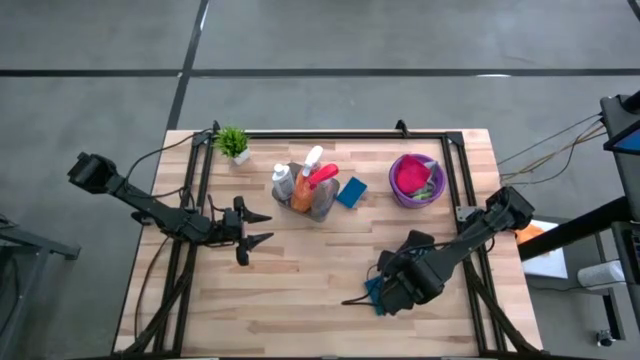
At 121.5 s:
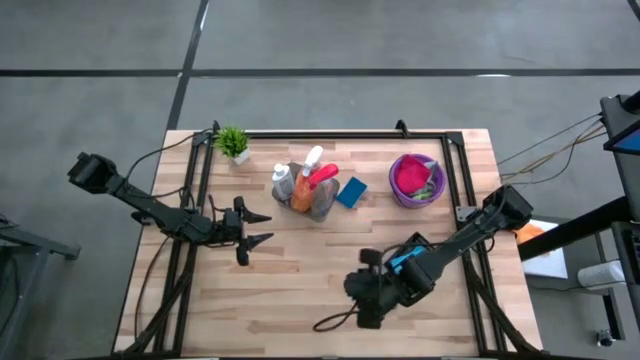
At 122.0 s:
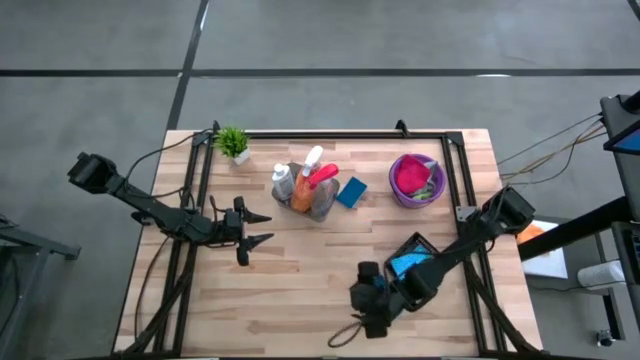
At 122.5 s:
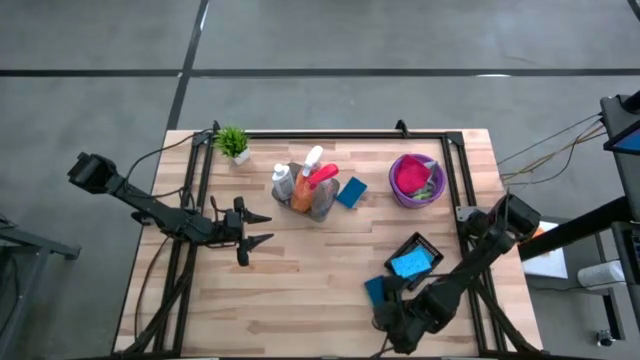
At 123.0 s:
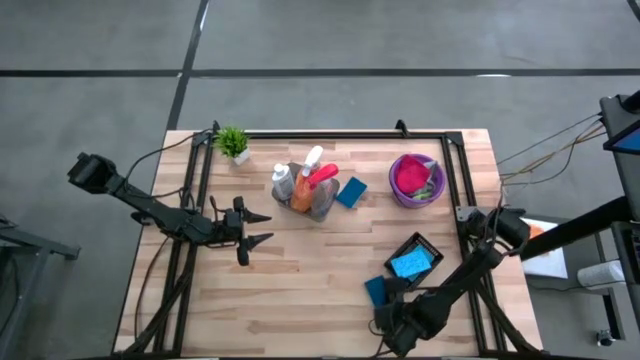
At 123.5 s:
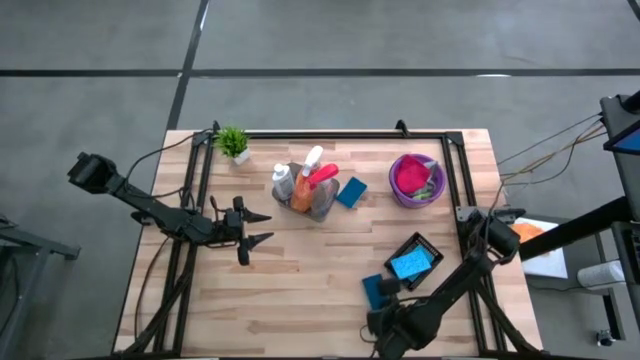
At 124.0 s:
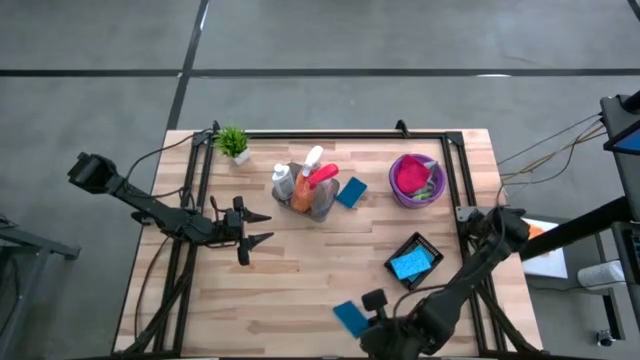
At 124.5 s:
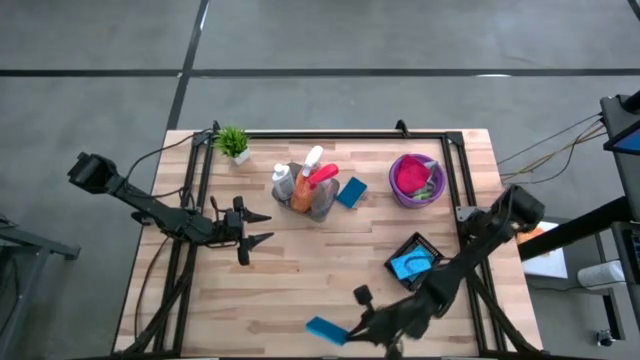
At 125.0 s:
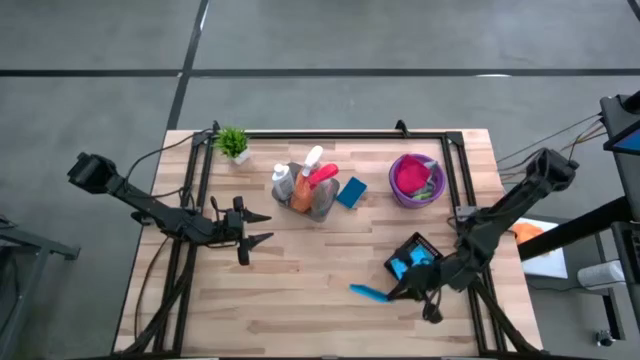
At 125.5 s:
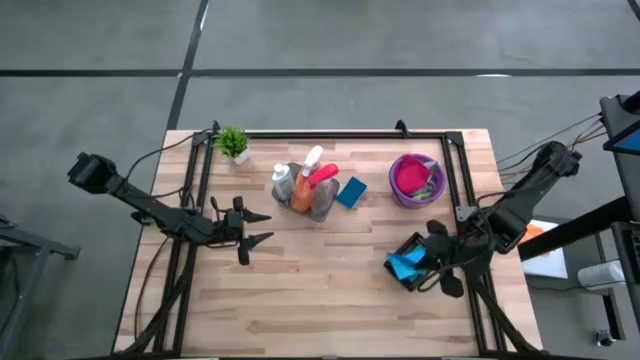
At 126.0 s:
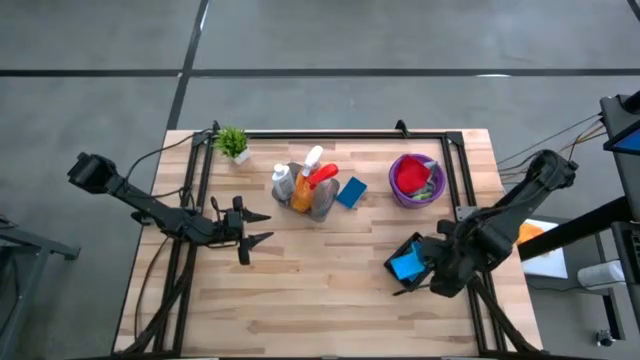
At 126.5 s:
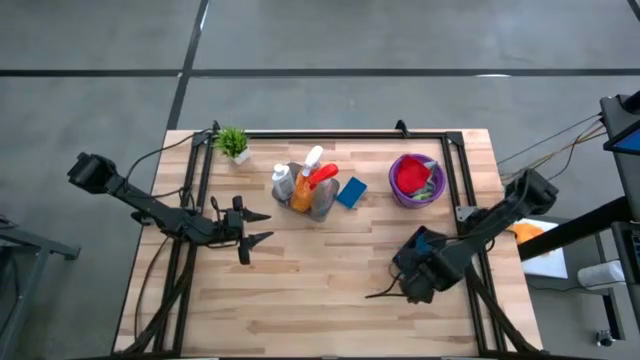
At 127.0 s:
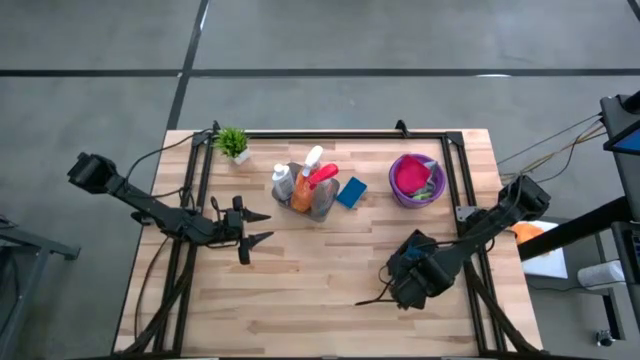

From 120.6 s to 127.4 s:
Task: Pick & Place Kitchen Items
Put the blue sponge into the black basket

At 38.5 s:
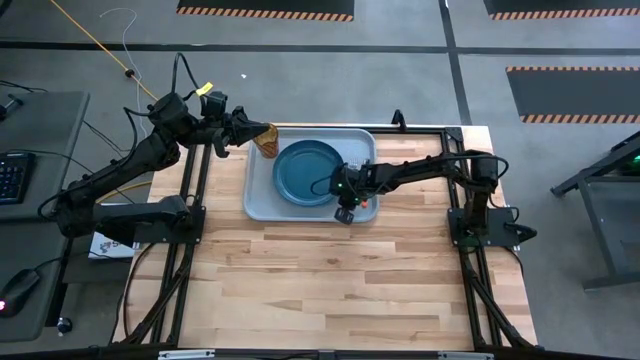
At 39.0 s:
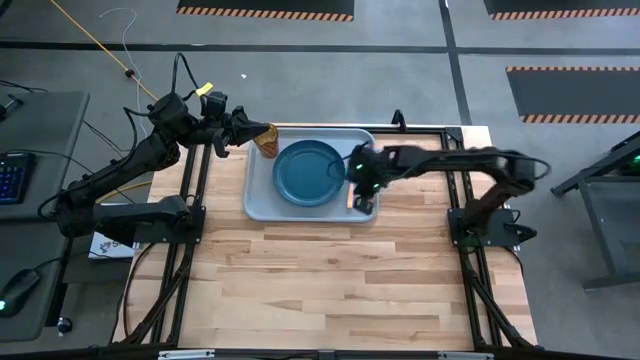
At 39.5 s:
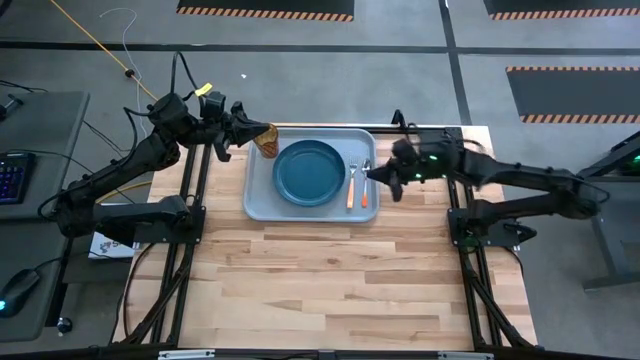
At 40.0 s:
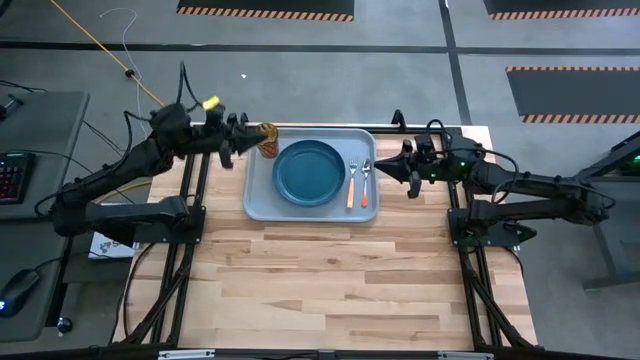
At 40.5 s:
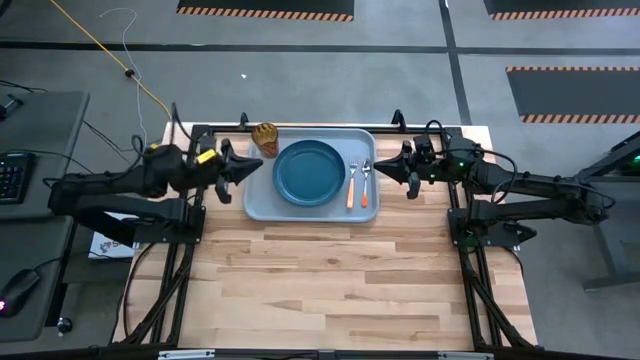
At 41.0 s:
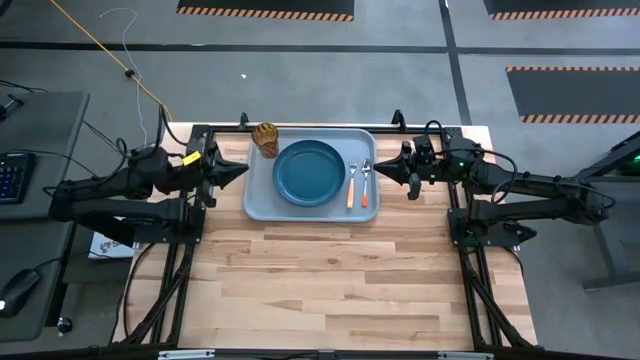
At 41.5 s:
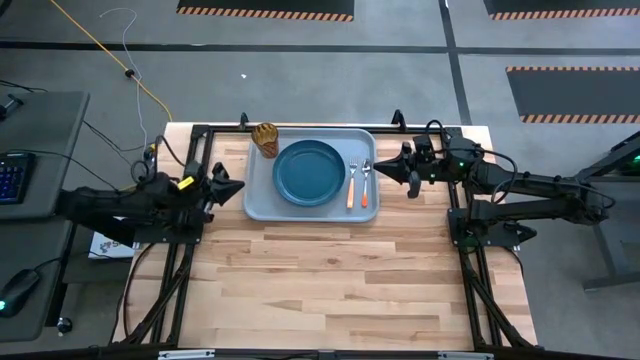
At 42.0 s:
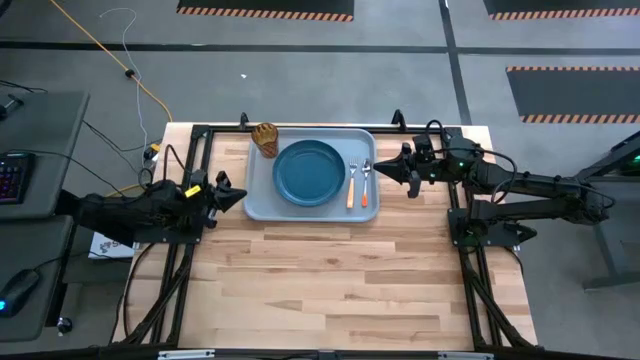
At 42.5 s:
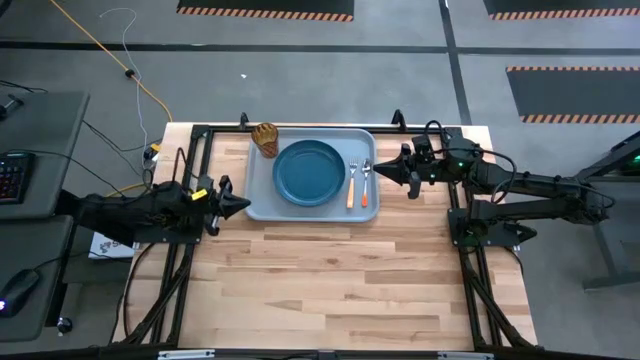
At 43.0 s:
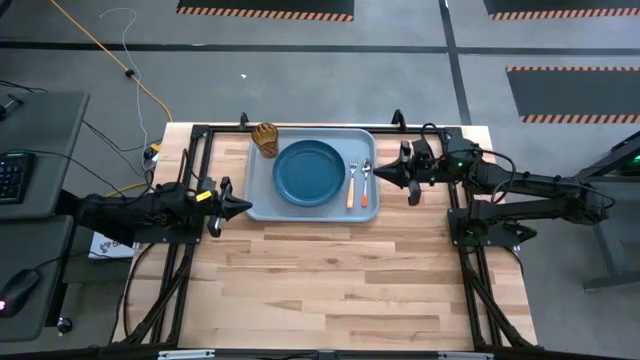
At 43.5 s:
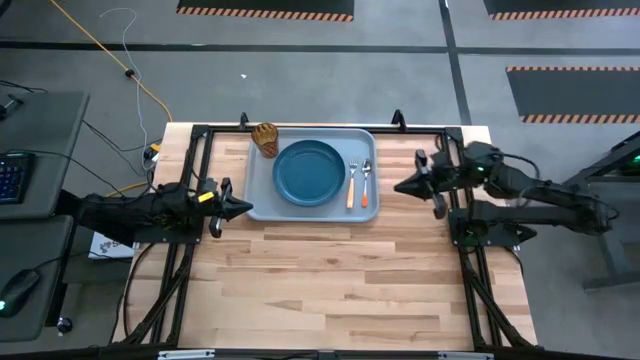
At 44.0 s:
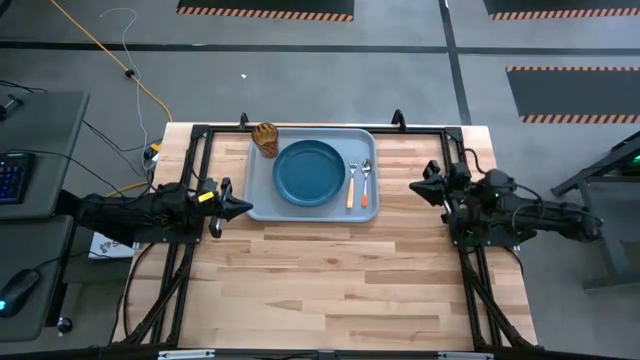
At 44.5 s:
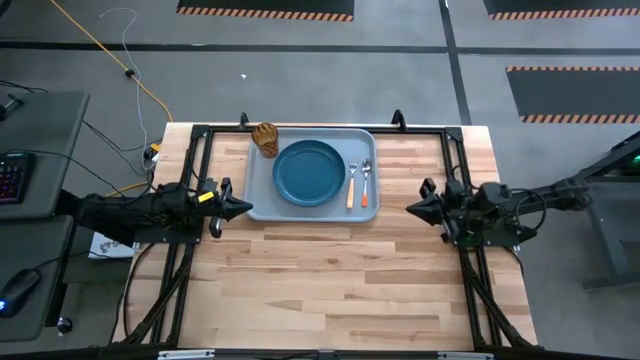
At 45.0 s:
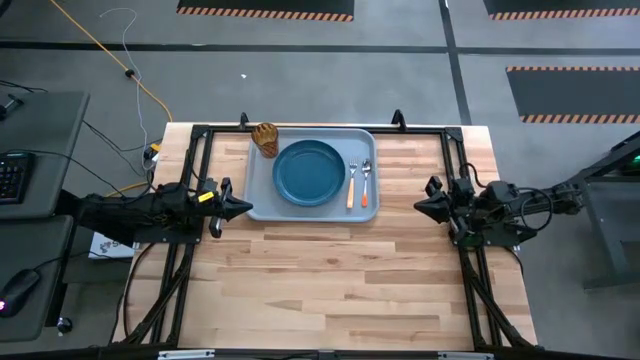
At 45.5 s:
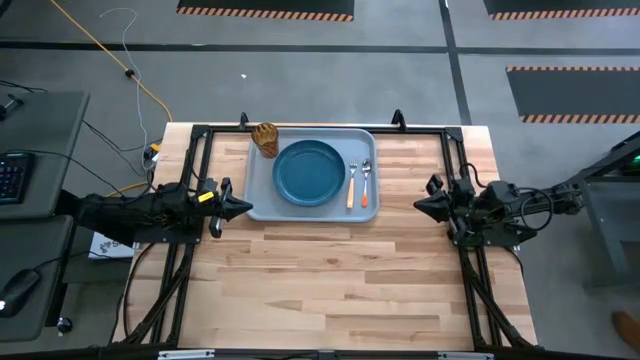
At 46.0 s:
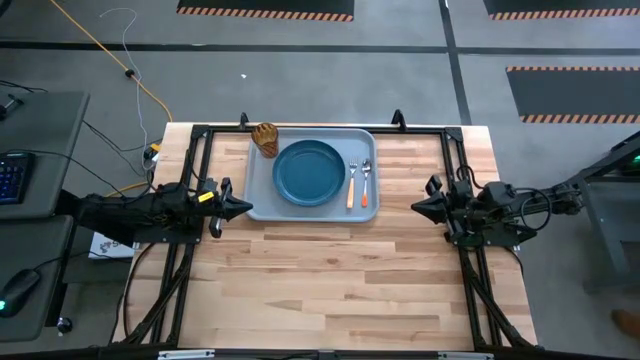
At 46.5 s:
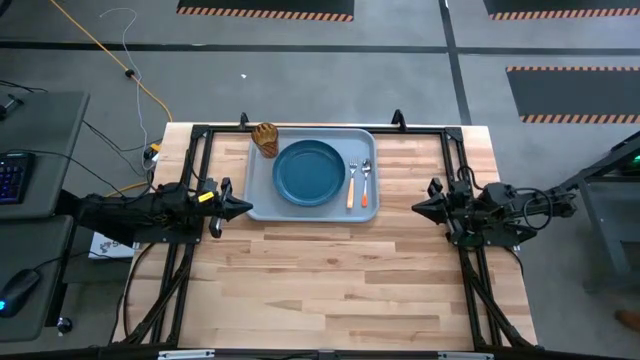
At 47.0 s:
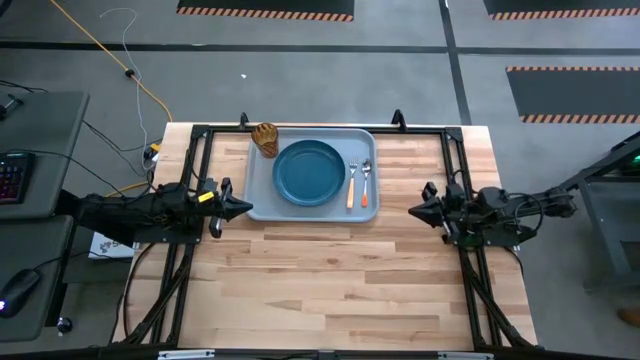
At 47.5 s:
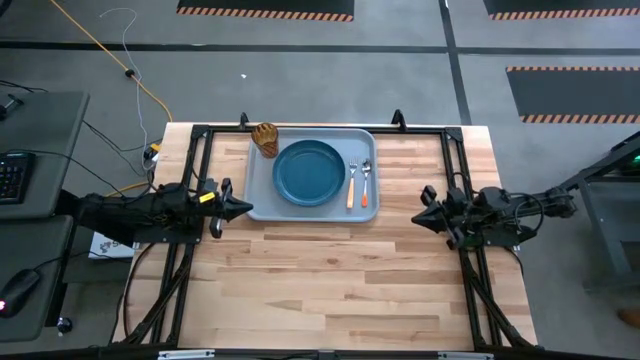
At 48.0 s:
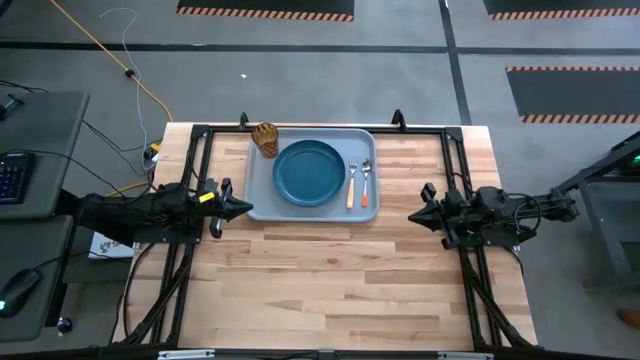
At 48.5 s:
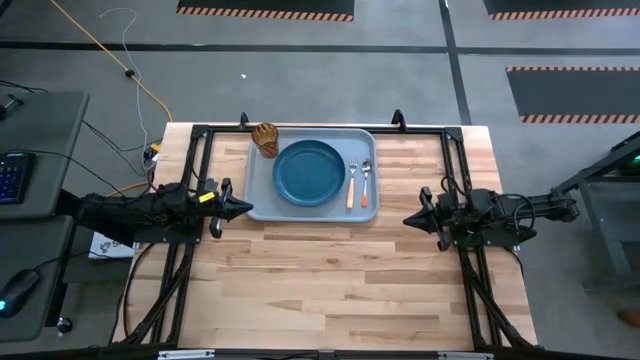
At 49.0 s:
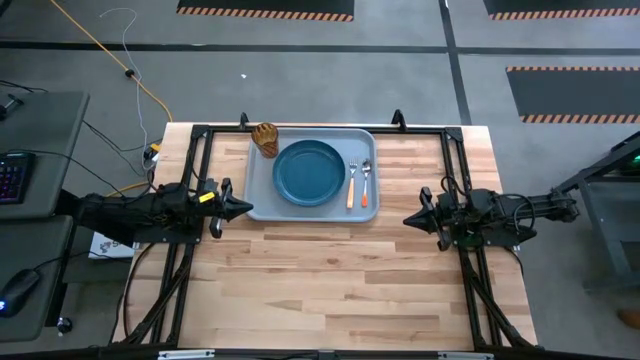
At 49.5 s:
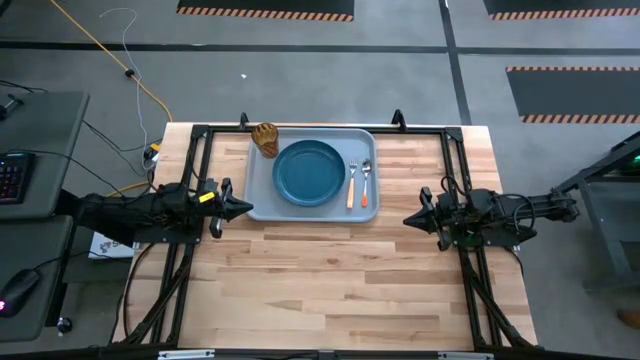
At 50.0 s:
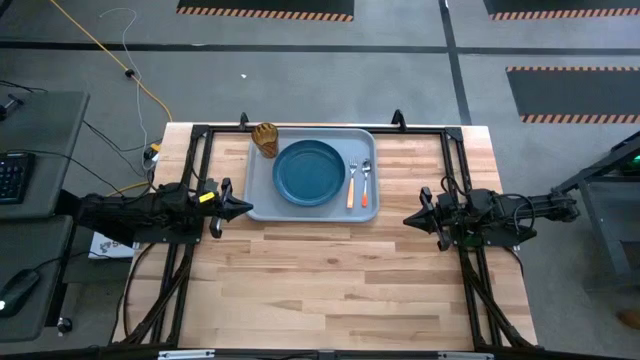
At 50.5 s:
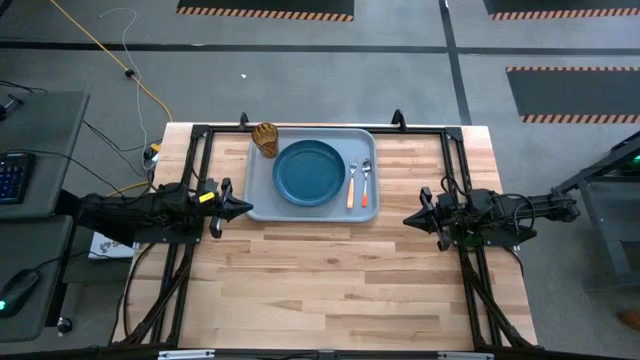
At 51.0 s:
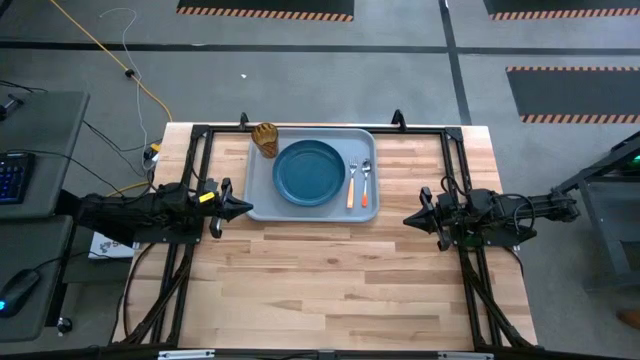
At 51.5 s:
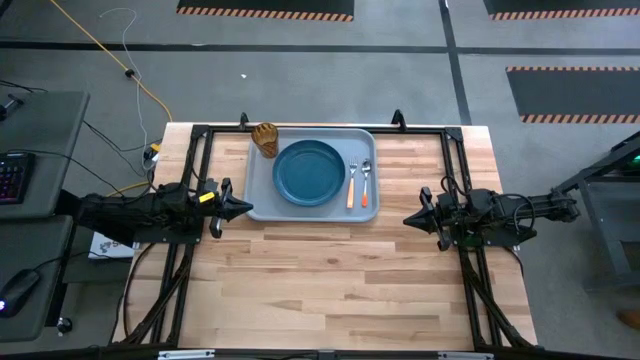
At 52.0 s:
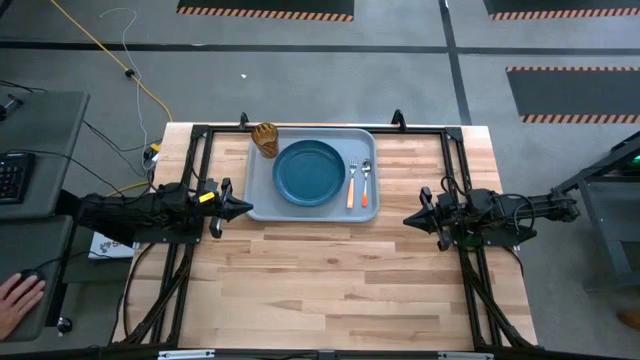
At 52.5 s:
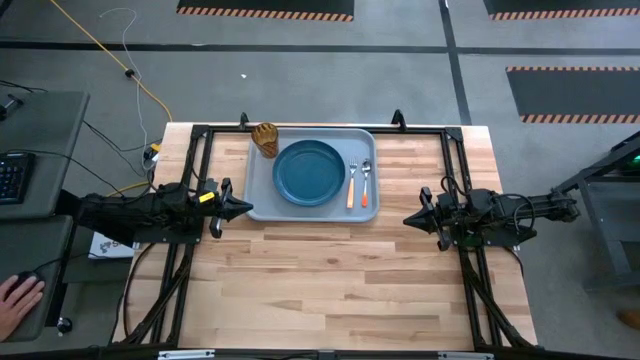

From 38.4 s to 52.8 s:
Task: Pick and place plate/cup/fork/spoon on tray
Return to Home Position
